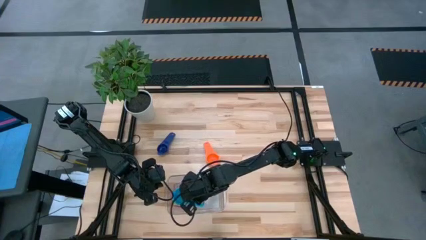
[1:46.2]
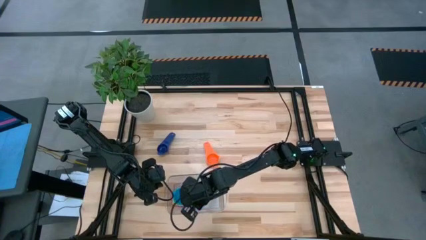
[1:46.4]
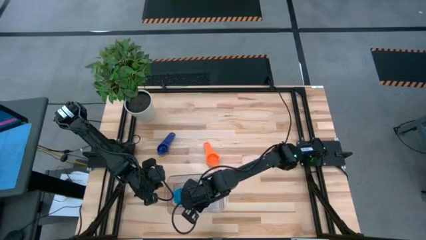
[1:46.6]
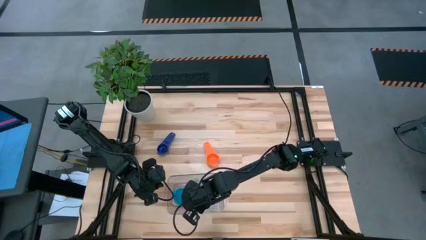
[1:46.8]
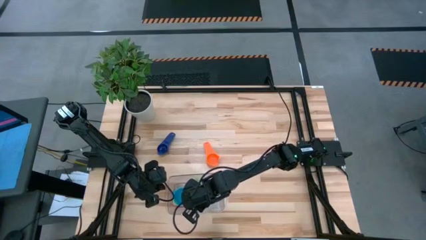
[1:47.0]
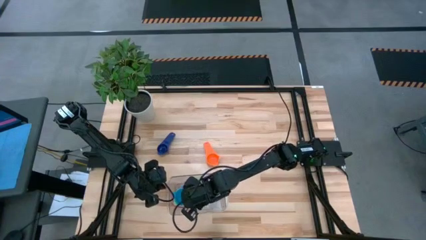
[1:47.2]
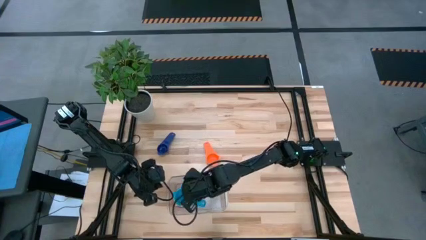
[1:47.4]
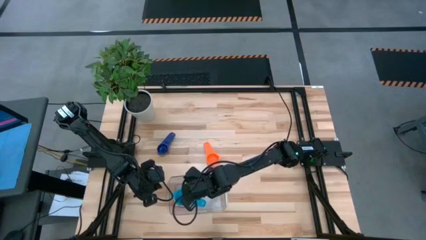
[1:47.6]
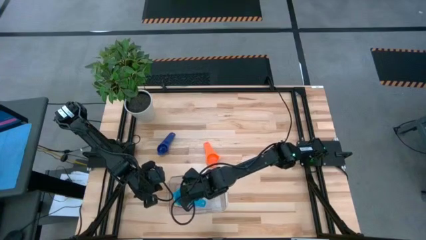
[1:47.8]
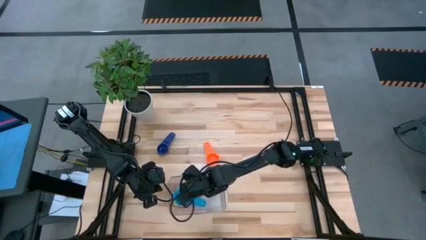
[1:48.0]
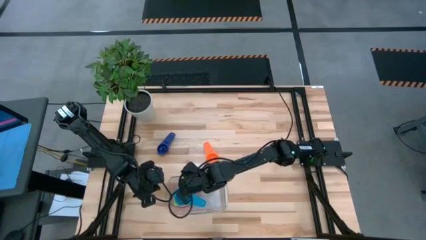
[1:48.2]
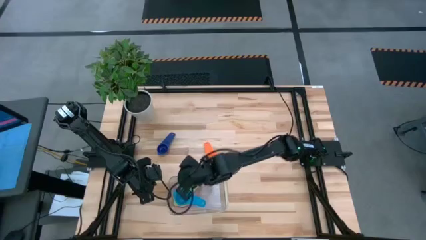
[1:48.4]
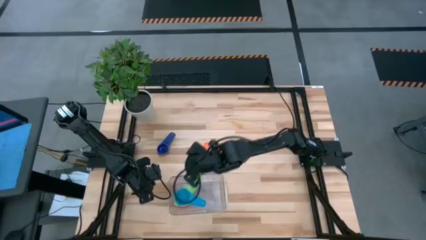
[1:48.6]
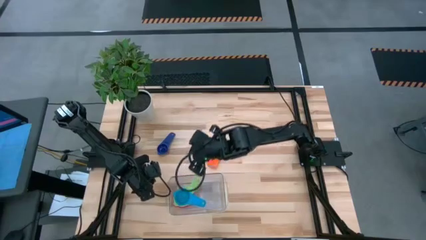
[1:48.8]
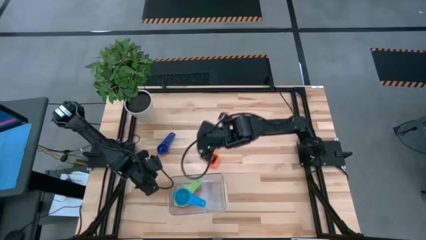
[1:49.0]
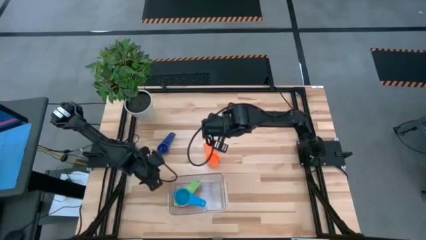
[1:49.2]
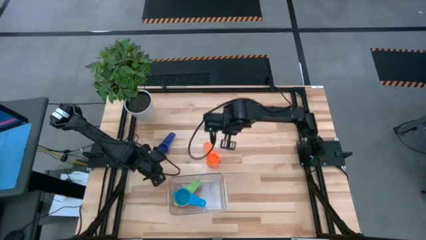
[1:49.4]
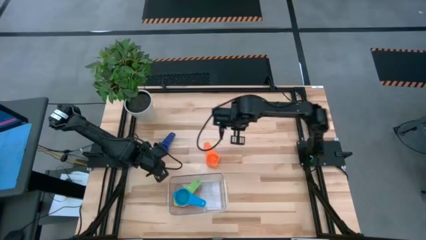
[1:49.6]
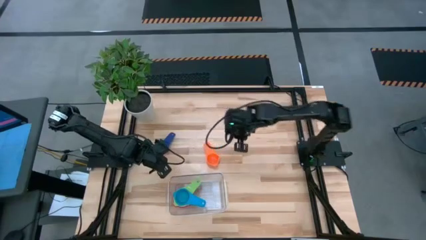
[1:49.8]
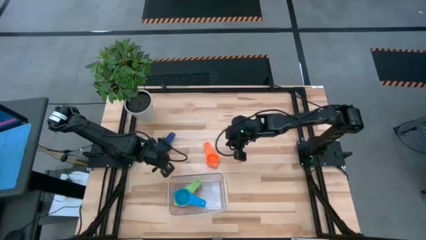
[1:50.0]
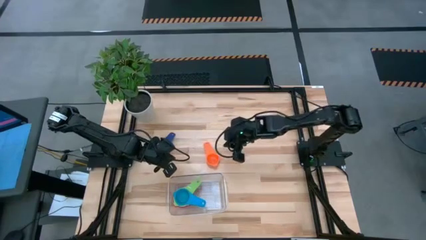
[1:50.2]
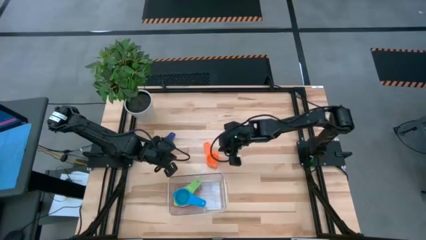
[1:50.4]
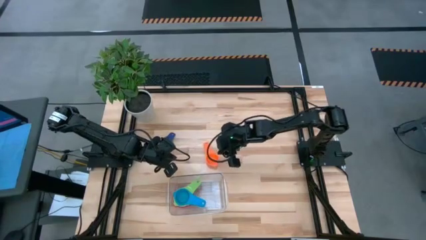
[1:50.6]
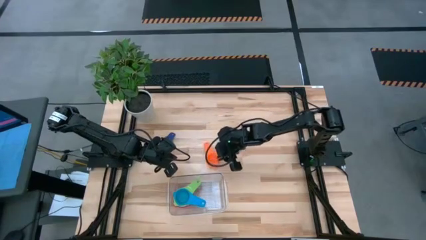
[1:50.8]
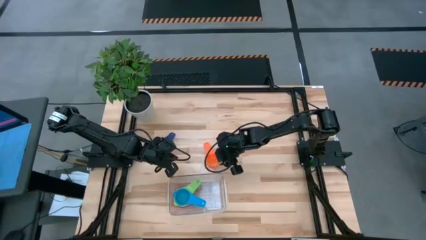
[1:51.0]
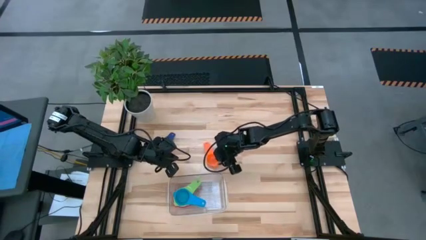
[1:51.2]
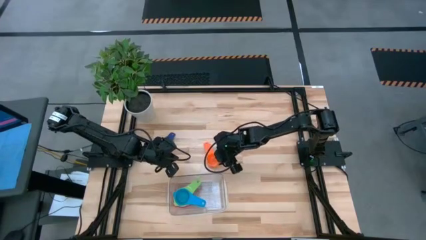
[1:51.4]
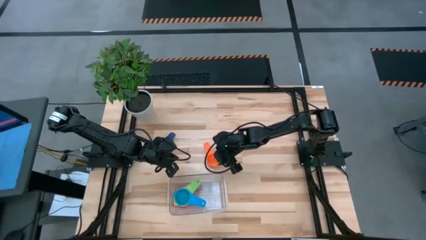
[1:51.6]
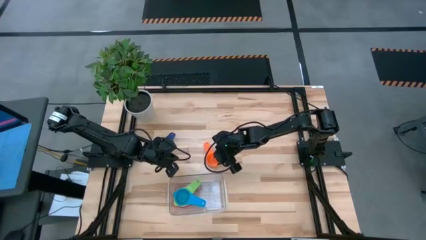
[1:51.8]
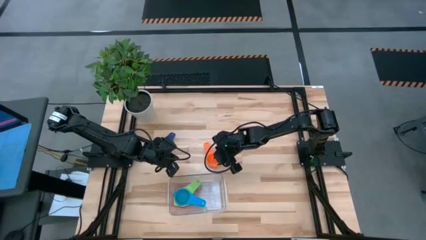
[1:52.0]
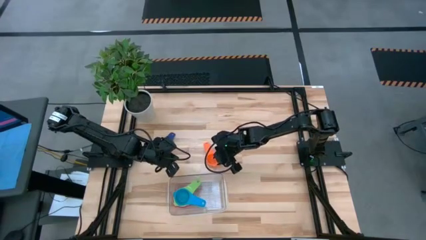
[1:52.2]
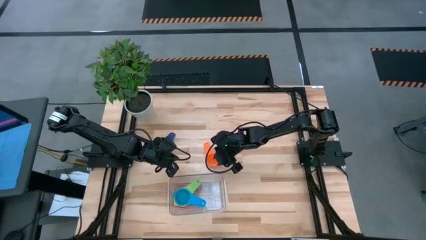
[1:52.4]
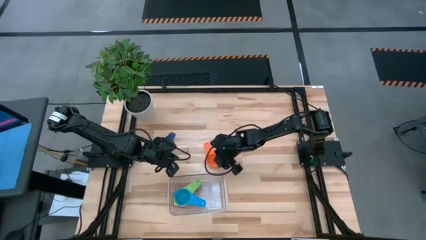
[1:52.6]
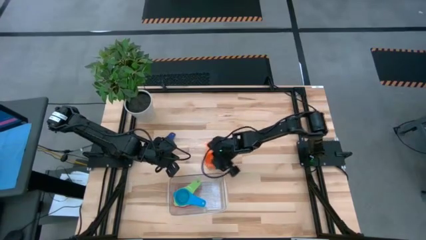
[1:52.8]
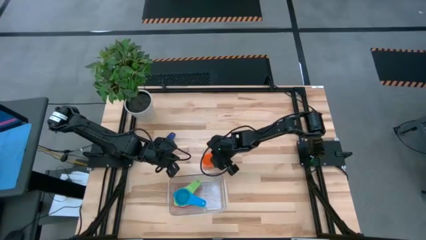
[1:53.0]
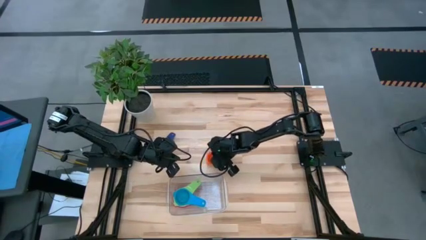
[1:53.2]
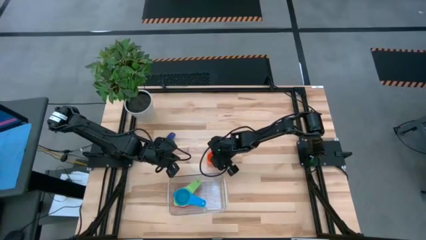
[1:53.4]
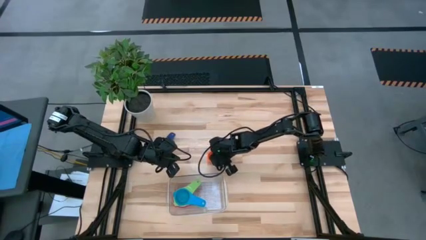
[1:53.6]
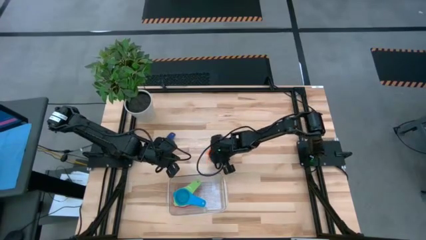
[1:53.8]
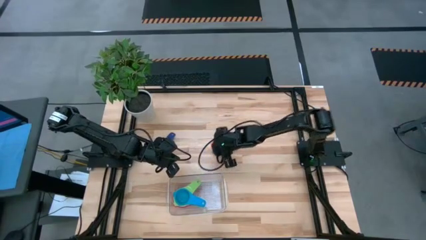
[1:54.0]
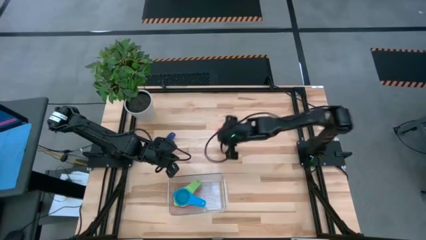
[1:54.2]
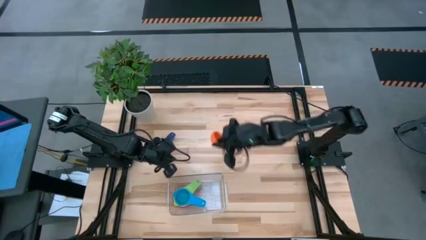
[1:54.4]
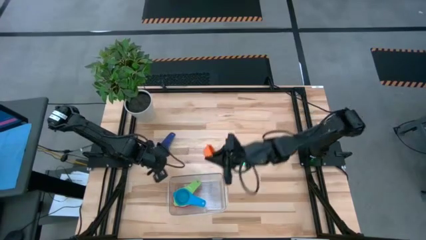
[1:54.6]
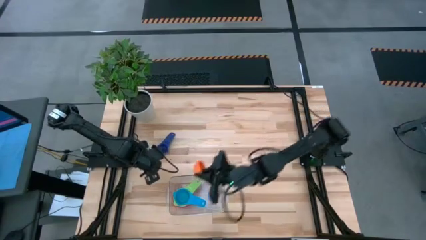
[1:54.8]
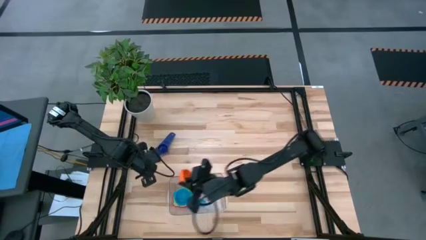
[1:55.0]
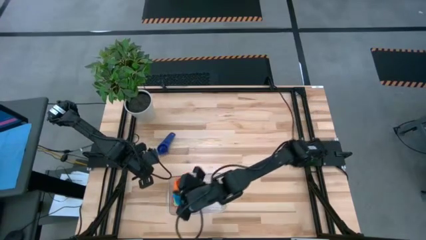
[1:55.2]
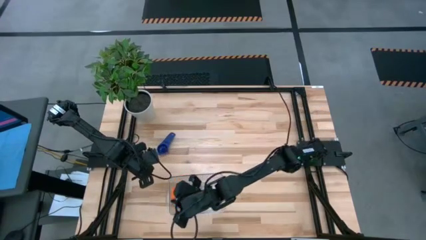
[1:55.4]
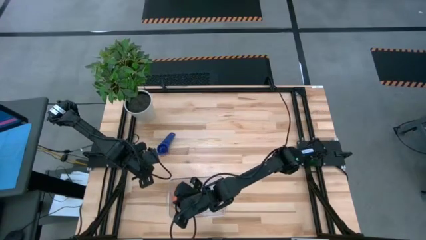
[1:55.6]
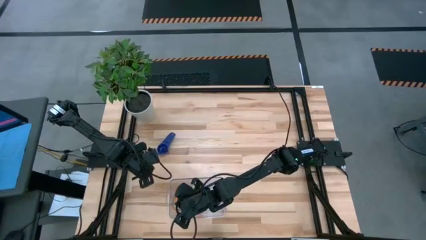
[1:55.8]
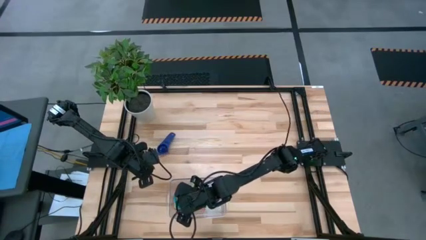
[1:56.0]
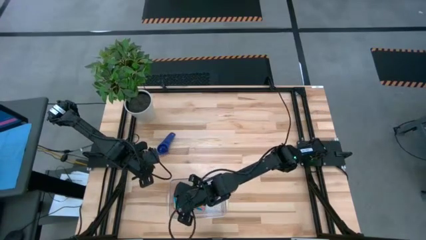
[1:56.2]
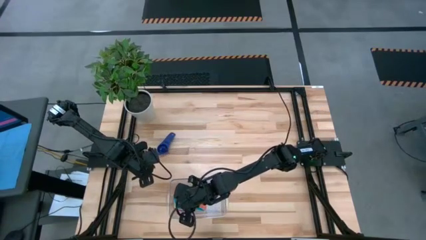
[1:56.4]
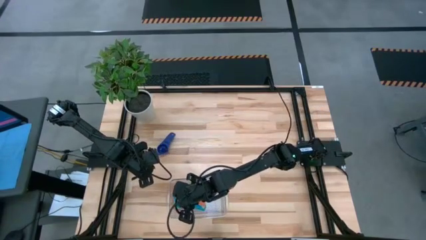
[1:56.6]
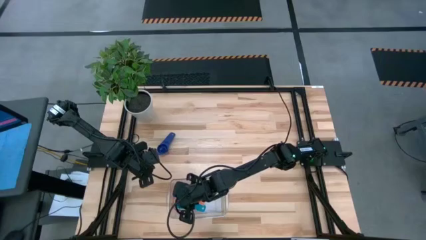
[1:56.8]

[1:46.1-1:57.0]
Task: Nest measuring cups in basket
Stack the orange measuring cup on top of the light blue measuring cup into the transparent bin

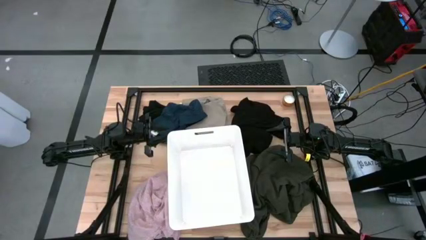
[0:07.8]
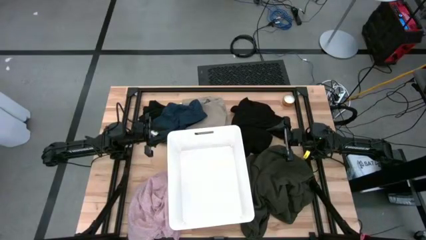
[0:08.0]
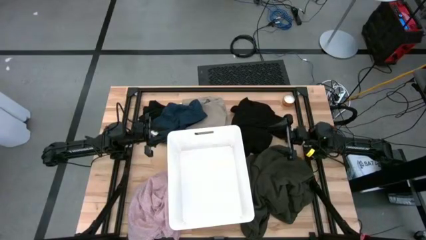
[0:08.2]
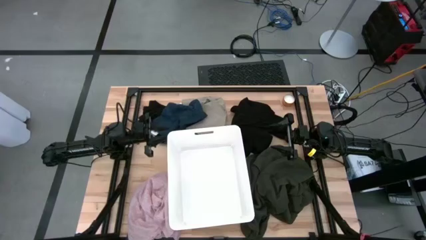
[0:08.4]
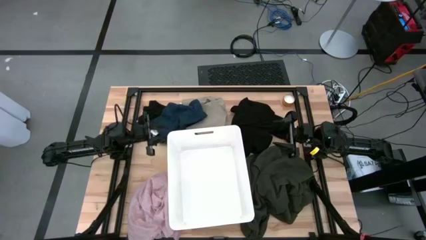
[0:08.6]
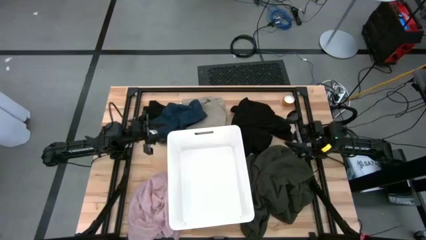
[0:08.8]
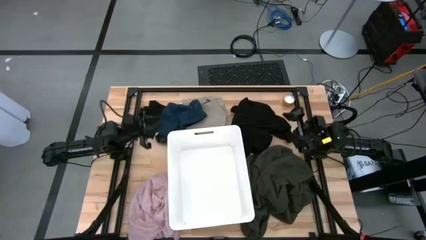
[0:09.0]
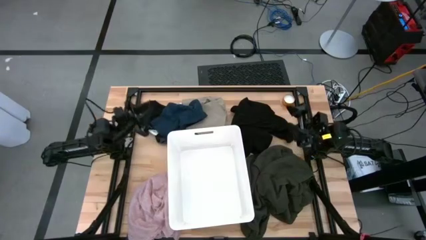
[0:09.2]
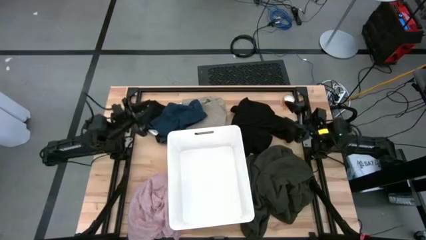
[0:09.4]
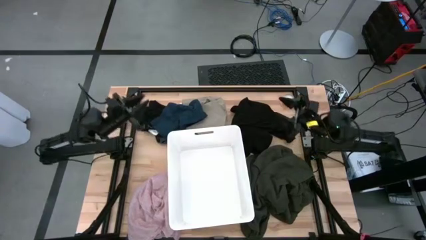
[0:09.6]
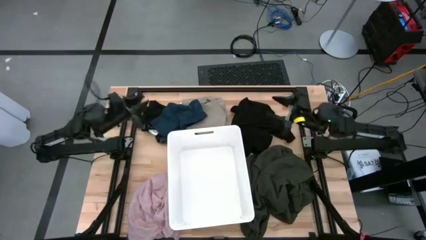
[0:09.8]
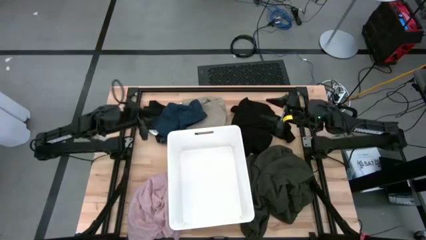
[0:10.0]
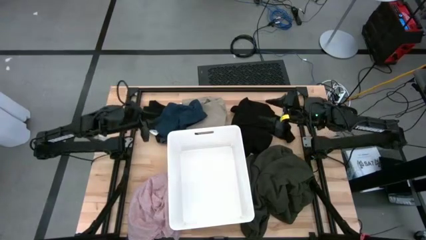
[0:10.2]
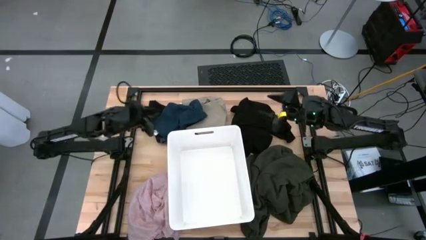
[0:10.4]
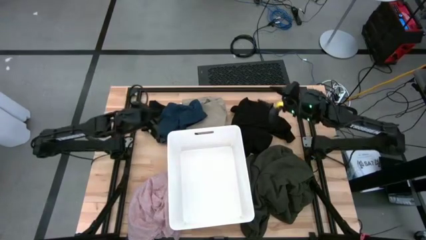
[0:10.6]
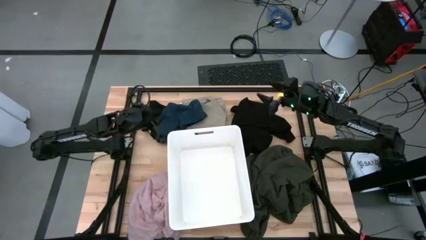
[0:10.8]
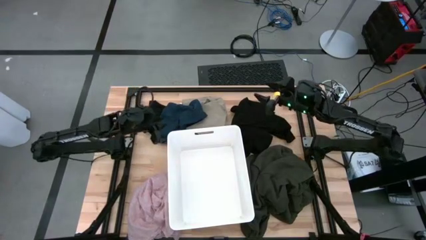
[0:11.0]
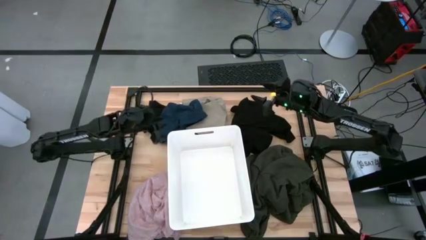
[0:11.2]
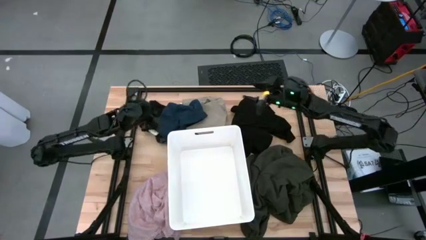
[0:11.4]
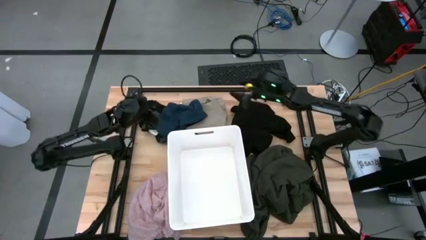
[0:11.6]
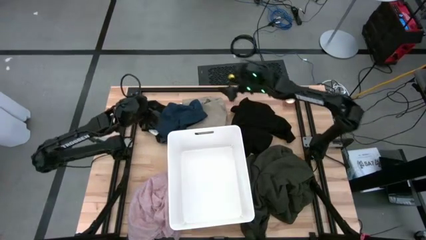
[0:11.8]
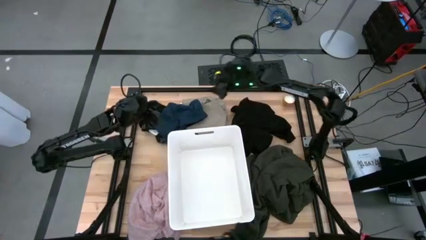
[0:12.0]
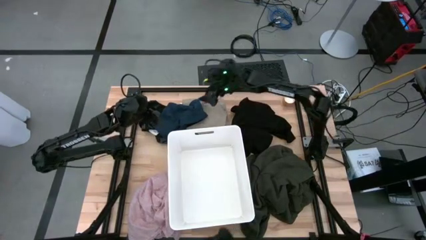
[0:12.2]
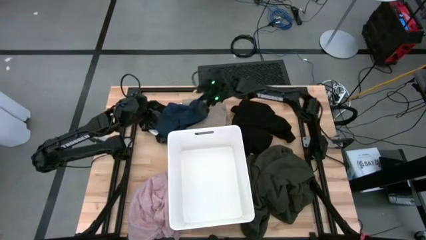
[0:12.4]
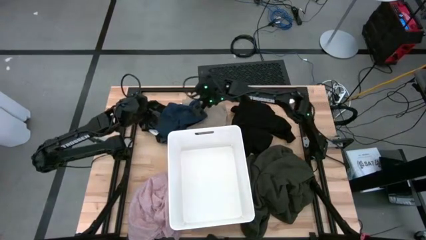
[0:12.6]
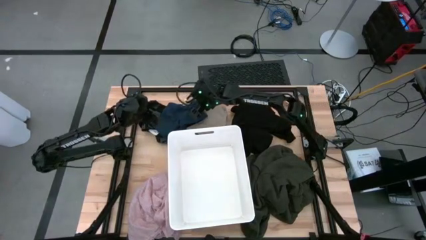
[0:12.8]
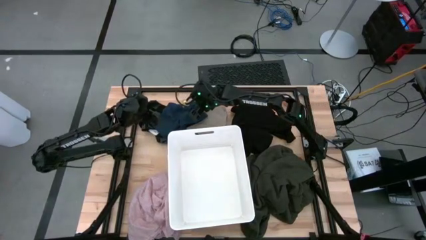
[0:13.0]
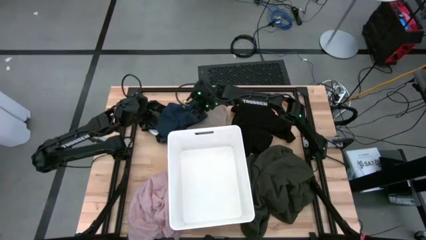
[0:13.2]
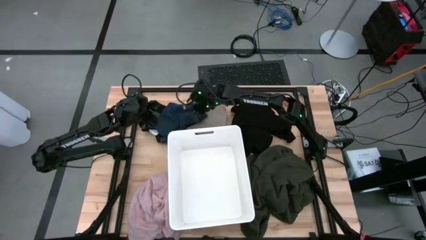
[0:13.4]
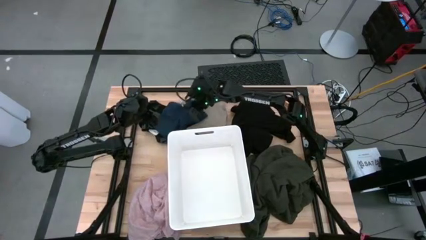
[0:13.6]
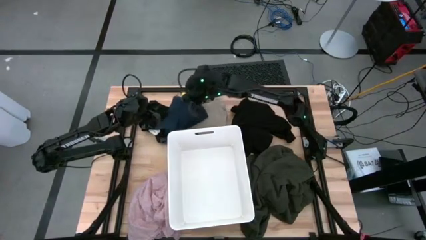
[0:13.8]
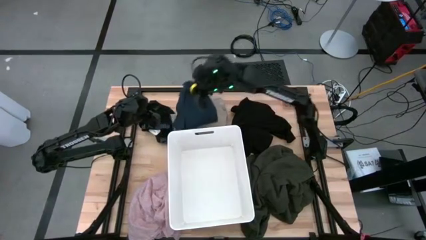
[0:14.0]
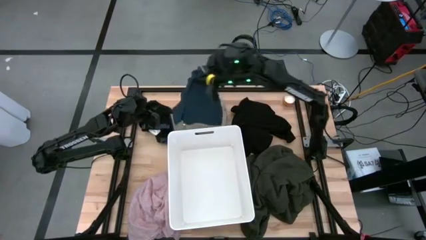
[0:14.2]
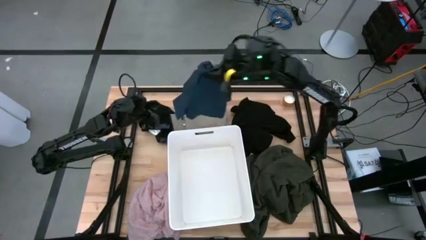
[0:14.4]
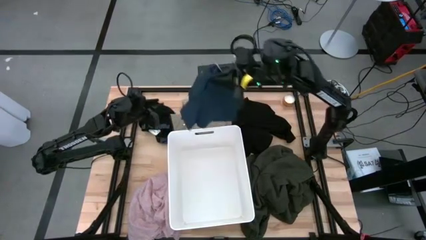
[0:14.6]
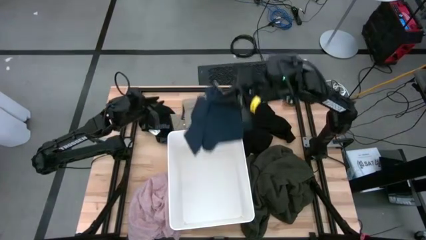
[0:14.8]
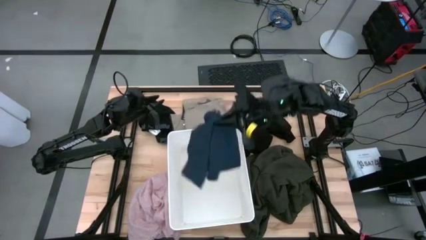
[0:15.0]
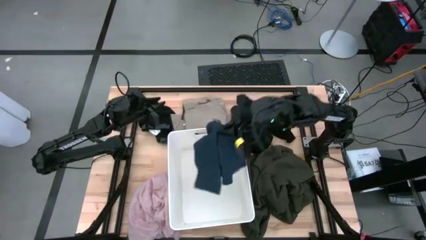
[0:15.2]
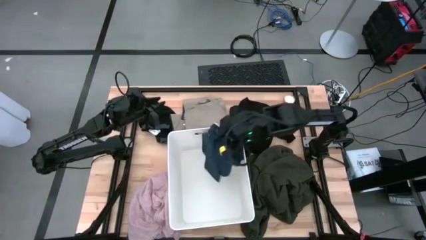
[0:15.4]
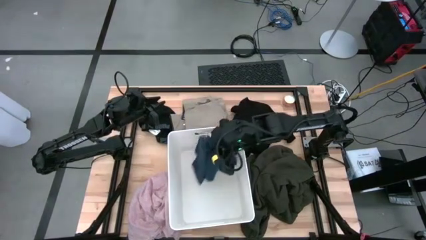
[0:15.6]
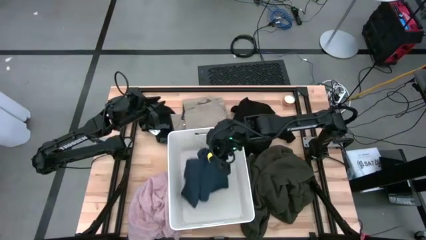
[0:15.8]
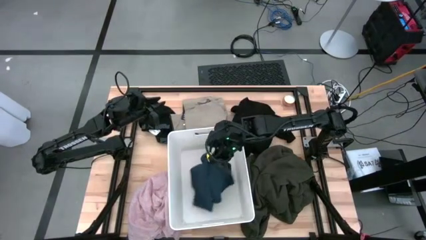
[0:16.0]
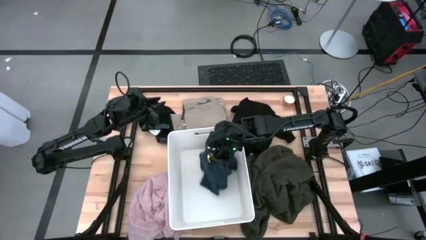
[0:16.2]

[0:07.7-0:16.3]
Task: Sort clothes
Put the blue shorts into the white laundry bin
